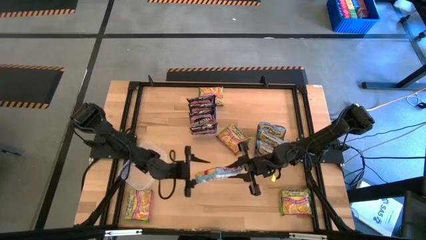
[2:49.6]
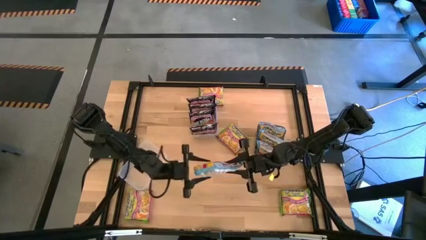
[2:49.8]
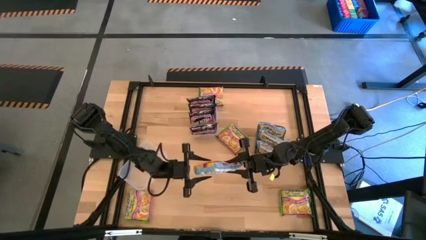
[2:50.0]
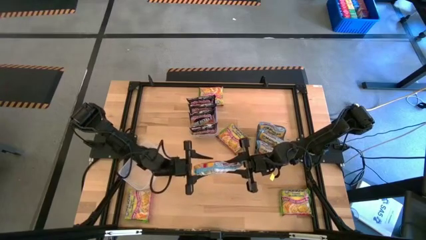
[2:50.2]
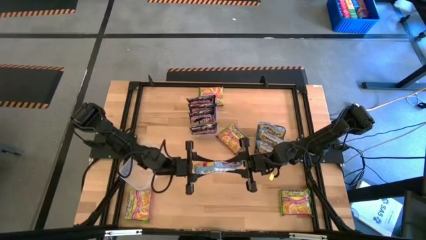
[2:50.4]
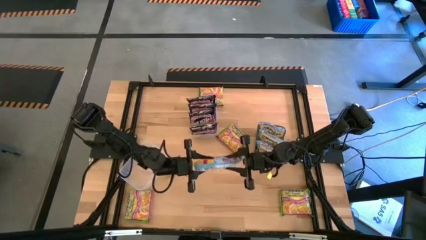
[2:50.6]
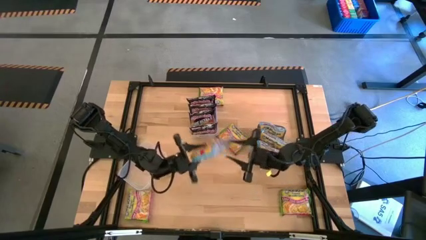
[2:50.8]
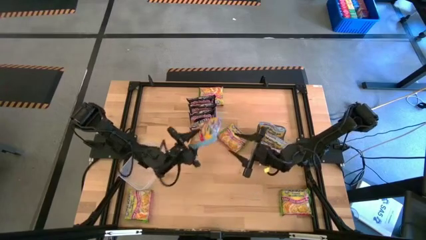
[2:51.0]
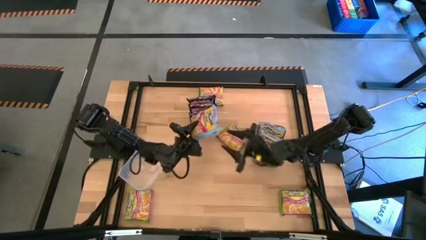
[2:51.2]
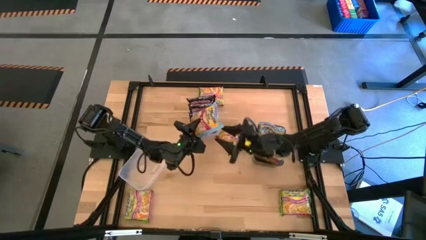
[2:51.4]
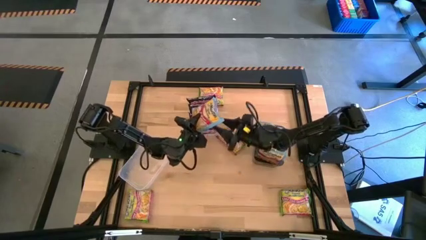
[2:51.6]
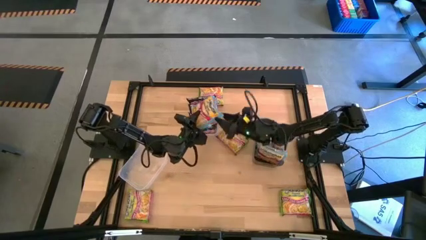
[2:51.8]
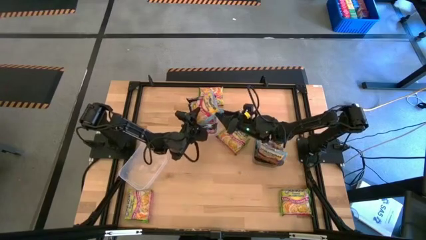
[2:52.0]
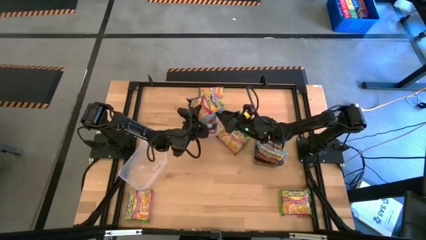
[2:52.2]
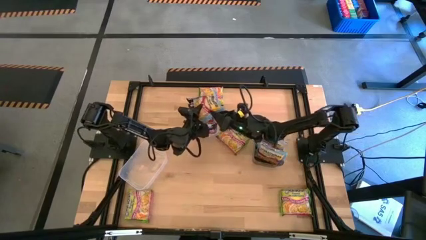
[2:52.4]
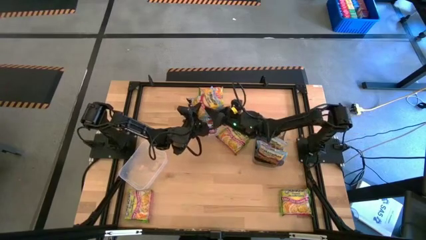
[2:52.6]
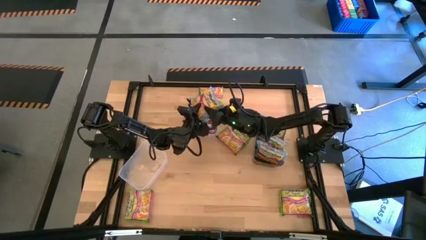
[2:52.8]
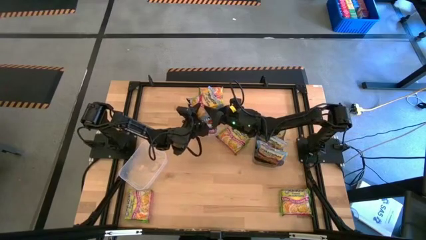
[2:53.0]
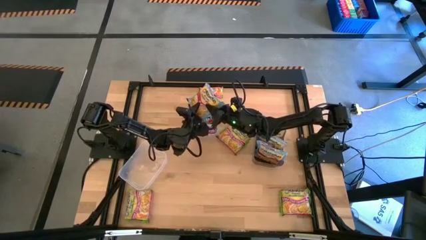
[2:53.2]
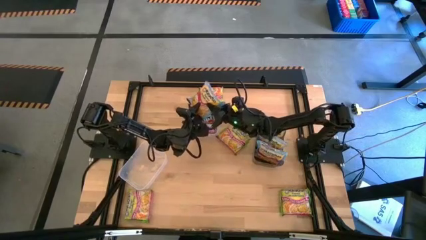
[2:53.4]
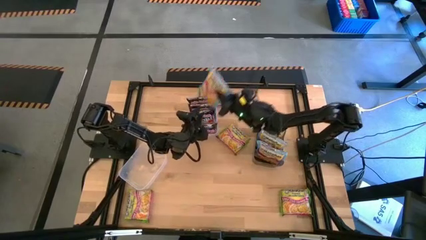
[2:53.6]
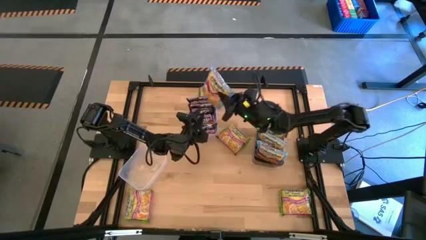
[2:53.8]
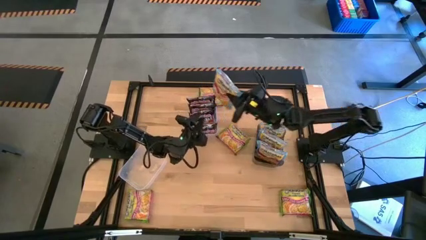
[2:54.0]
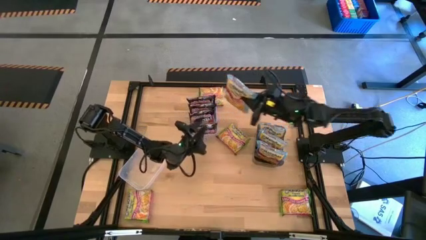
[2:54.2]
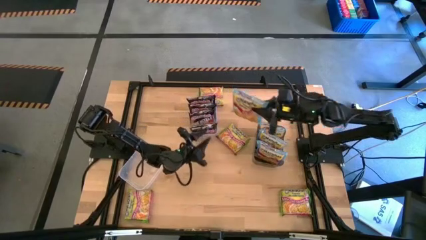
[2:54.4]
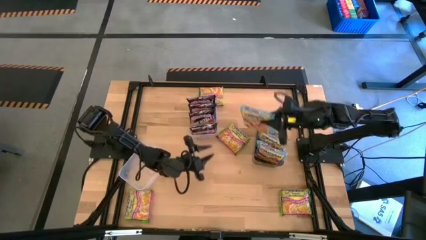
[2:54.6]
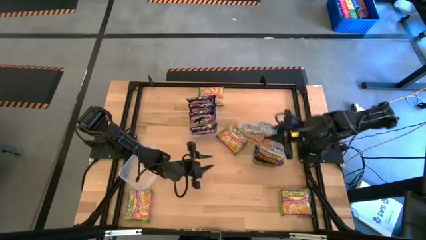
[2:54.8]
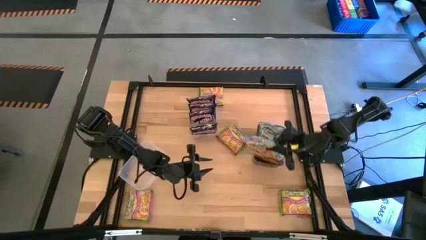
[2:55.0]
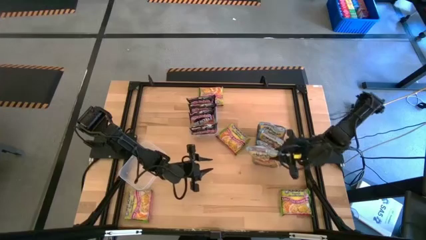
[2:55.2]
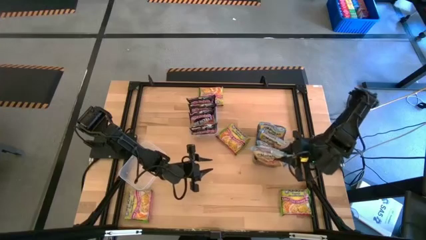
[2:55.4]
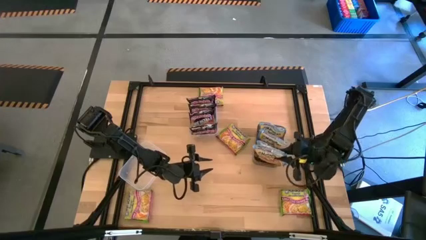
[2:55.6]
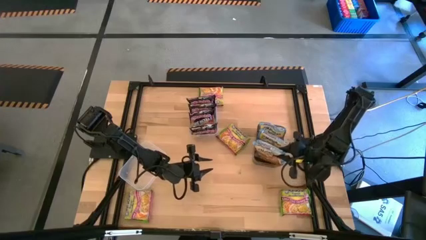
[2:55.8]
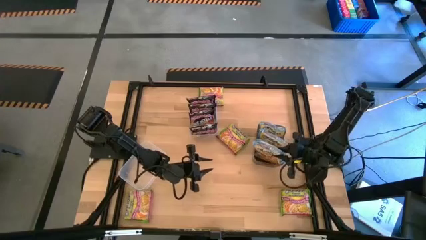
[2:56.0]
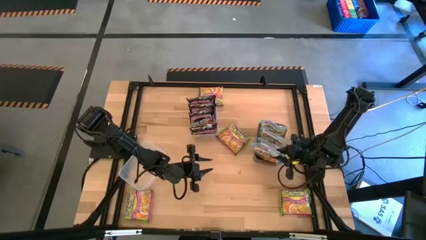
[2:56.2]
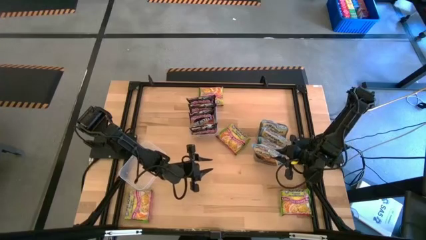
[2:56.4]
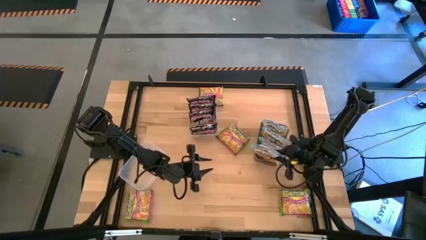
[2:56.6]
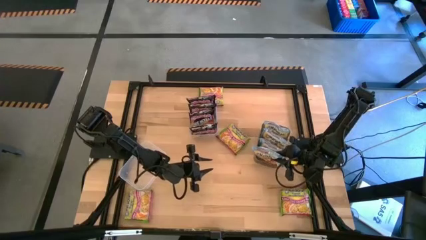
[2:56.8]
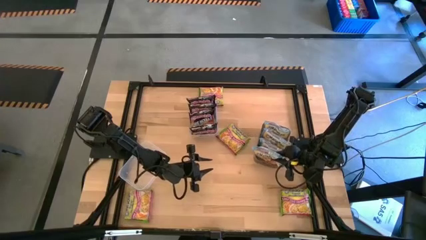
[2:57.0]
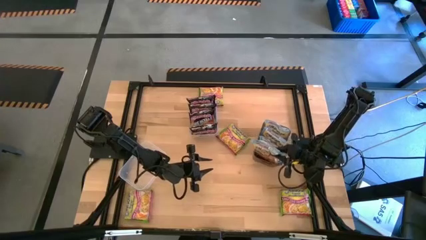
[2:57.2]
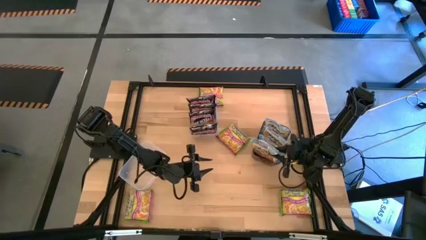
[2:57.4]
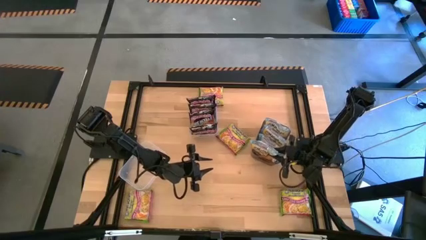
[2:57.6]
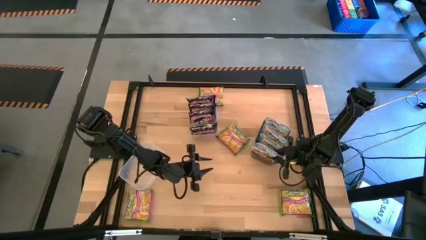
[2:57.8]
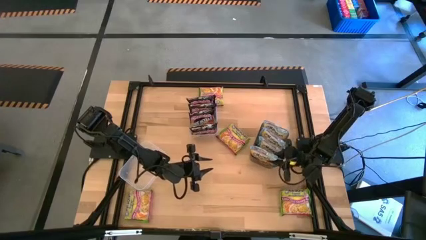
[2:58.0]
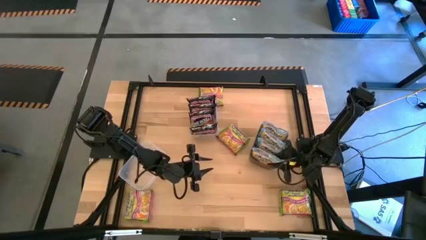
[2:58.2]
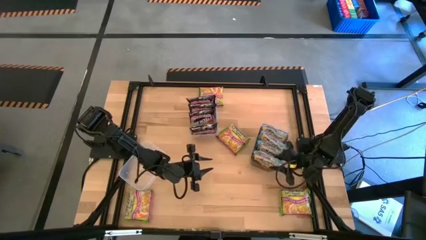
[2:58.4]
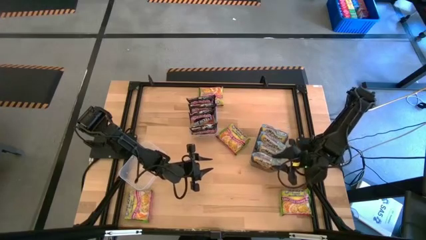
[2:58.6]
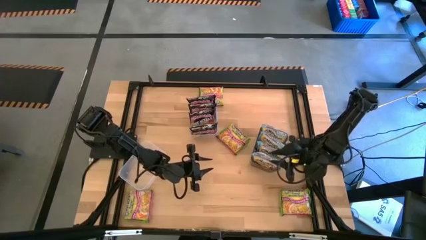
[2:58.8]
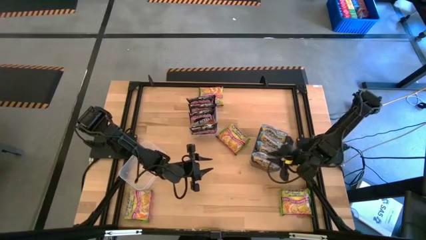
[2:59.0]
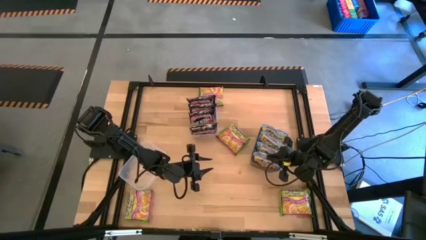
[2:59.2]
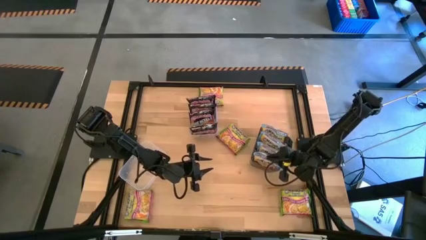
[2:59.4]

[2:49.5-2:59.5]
Task: Sort Maruchan noodles
Put the blue noodle pack into the black bin

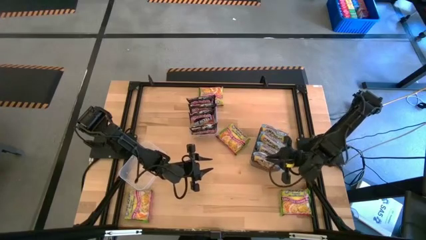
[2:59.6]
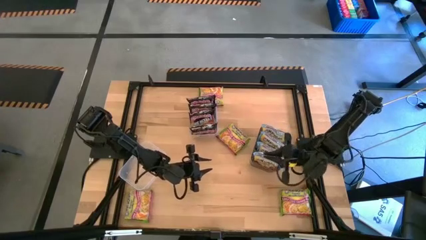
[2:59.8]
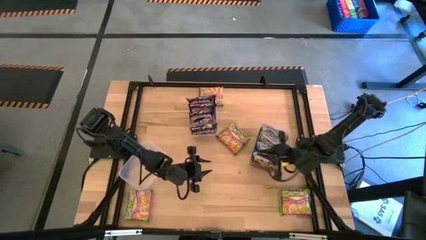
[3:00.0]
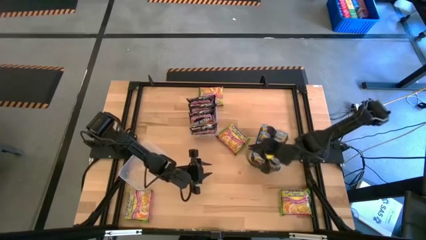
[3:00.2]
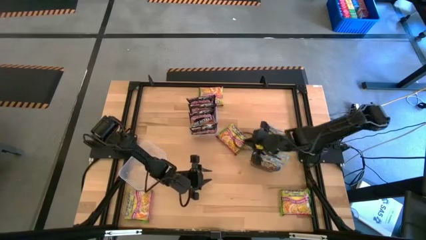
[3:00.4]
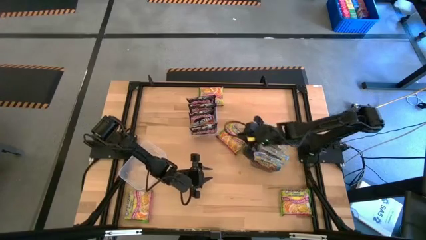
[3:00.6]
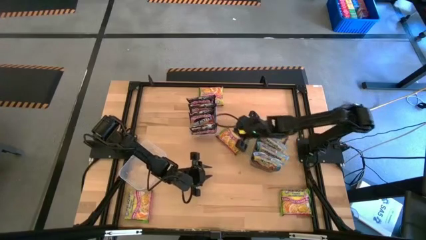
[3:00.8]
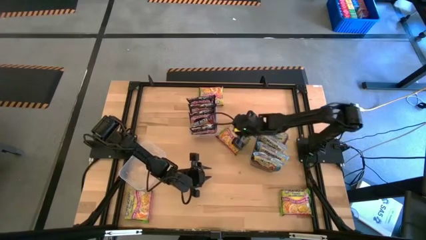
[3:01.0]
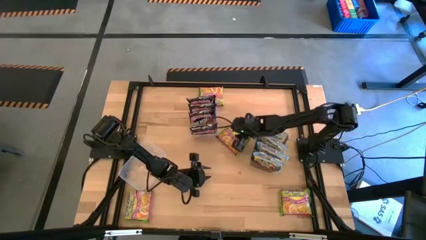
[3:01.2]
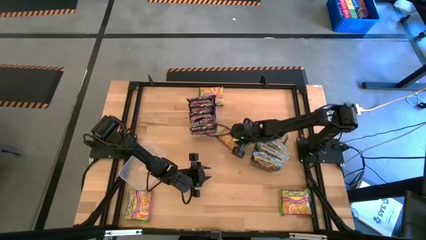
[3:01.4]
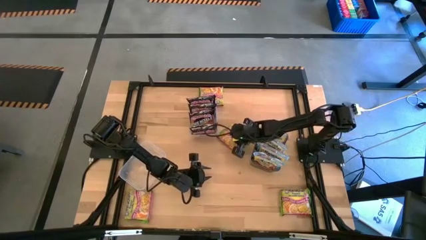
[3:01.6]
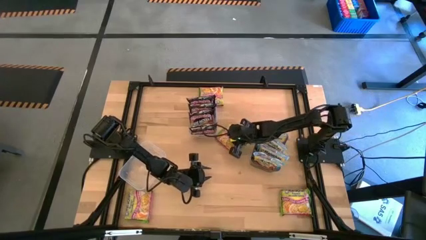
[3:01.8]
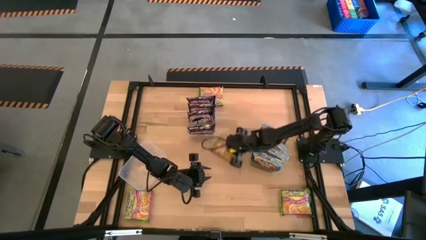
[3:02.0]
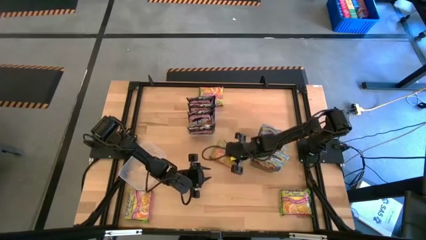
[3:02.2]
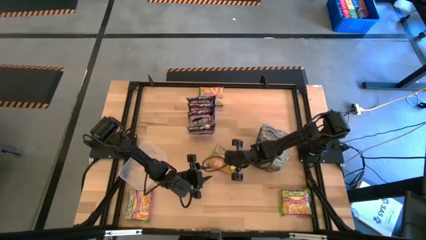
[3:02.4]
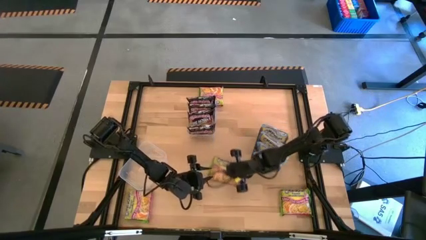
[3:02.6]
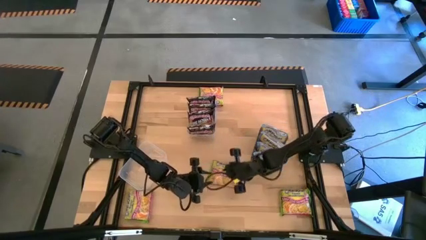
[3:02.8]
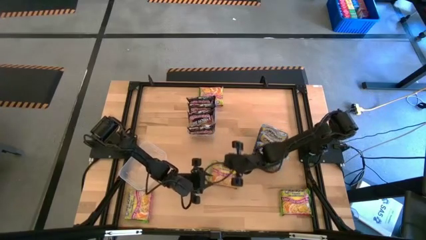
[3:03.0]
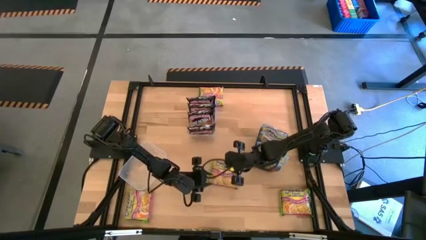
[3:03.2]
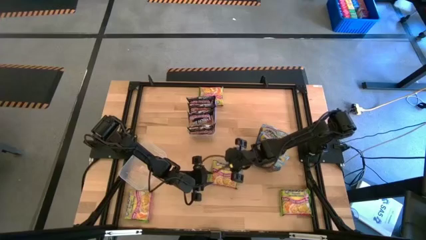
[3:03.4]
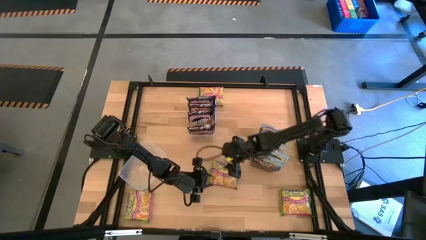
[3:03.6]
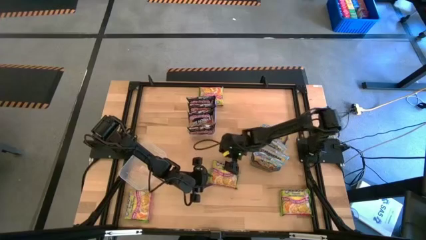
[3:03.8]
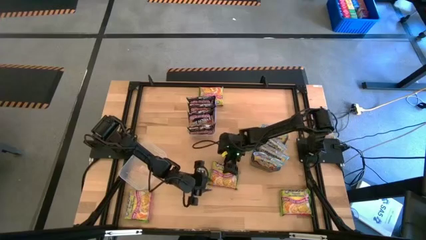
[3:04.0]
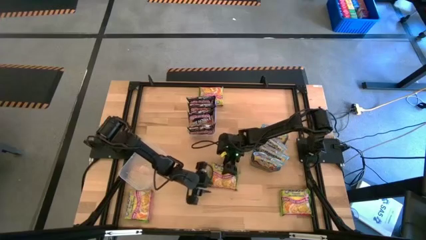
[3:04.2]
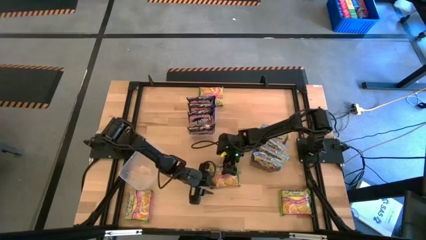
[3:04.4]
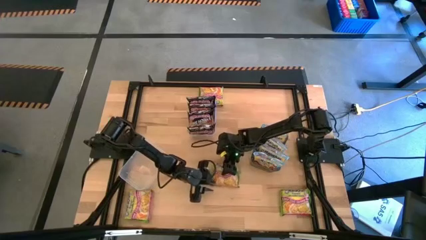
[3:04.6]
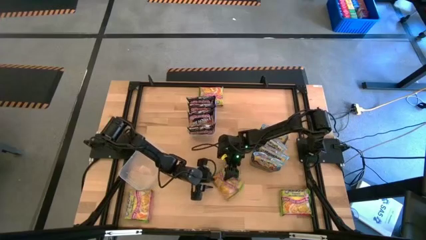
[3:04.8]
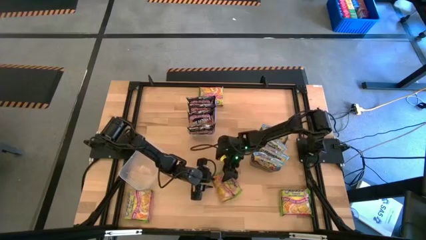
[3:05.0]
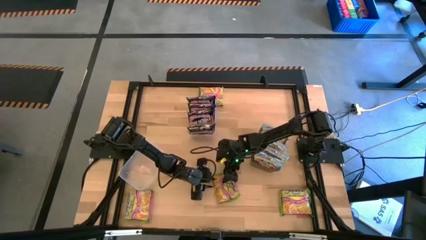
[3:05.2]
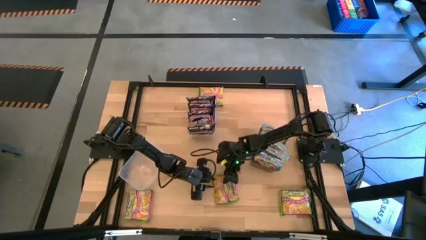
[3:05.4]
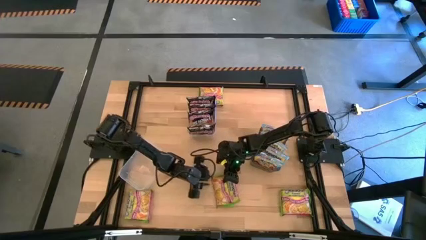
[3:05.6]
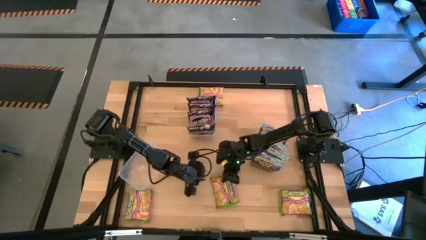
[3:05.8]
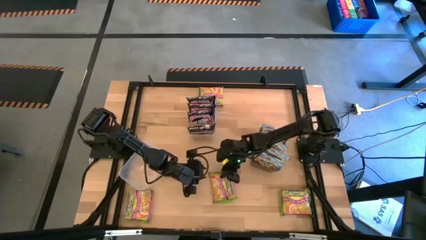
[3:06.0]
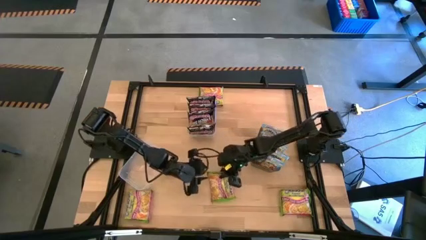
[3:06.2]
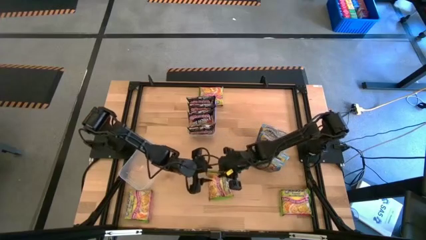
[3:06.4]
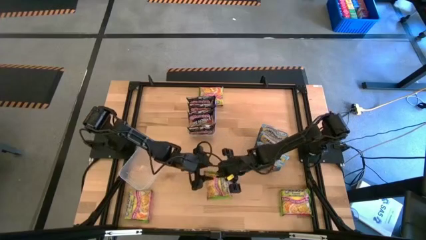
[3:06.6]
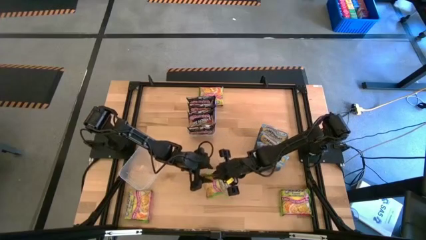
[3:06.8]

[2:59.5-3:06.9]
Put the green noodle pack into the left transparent bin
